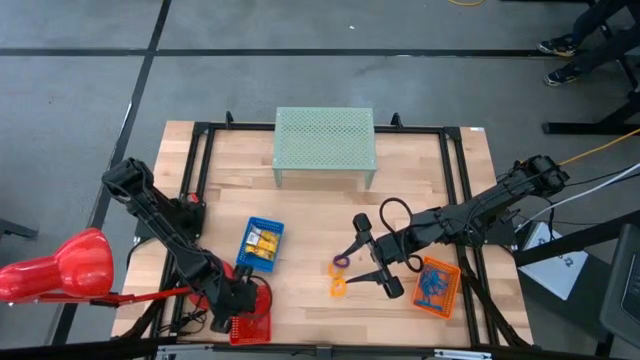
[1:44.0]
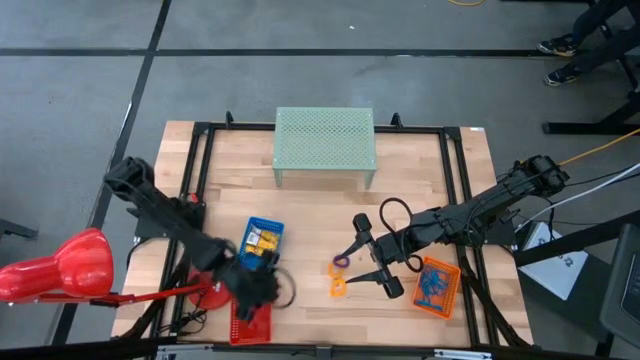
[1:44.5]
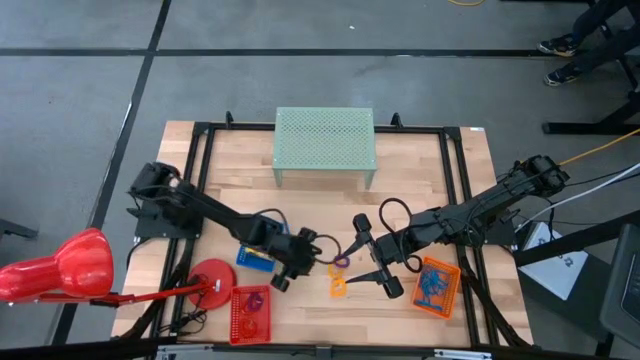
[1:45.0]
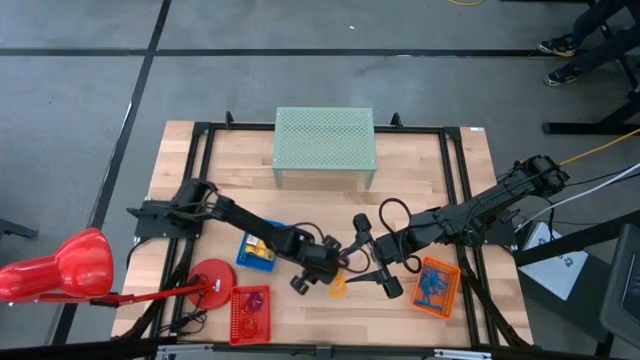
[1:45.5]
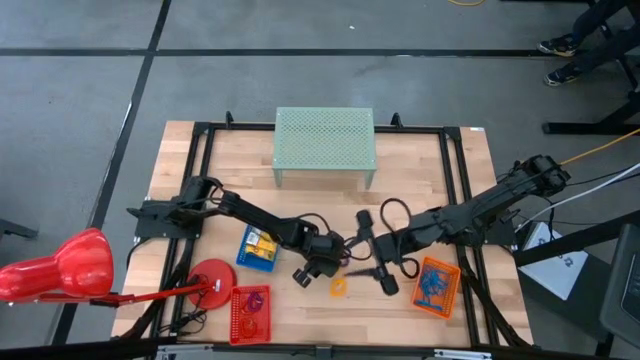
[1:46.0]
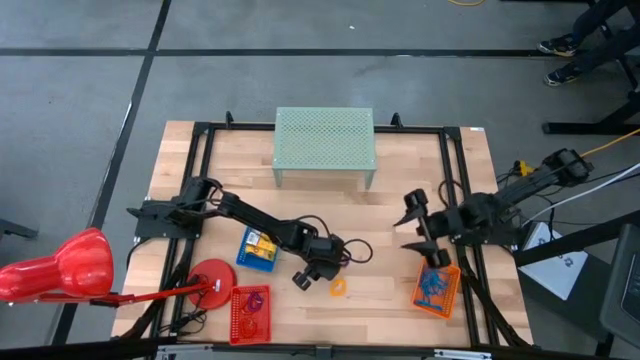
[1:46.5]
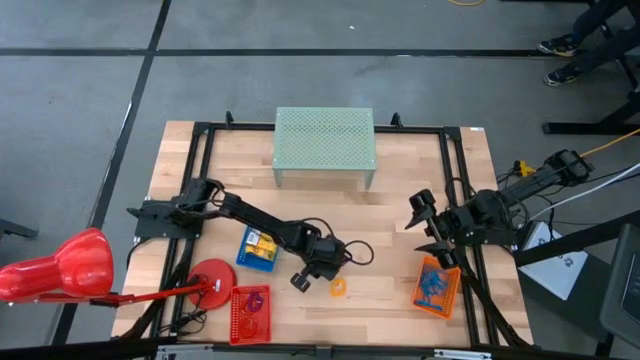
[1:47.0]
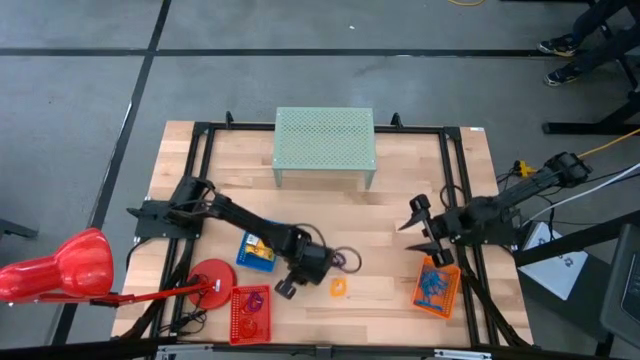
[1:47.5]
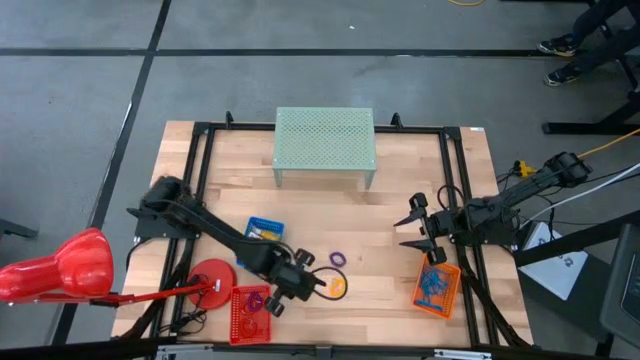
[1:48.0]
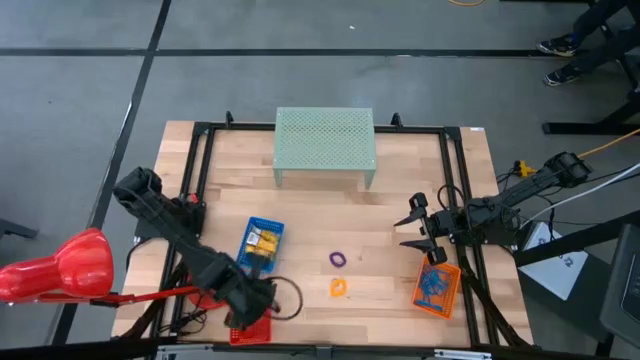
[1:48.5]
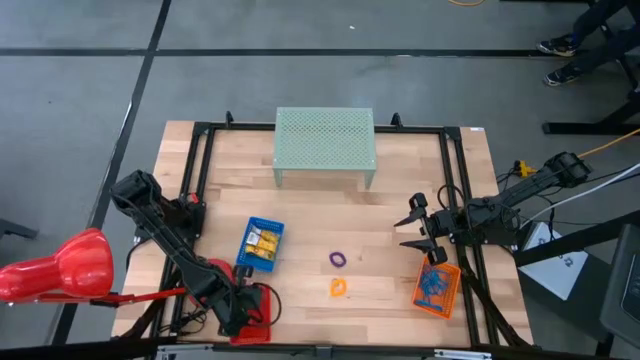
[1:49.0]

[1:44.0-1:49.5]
Task: Pick & Place Office Desk Supplies
Put the top yellow spiral band into the red bin

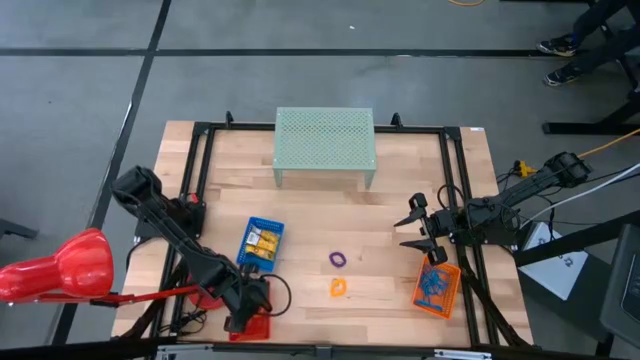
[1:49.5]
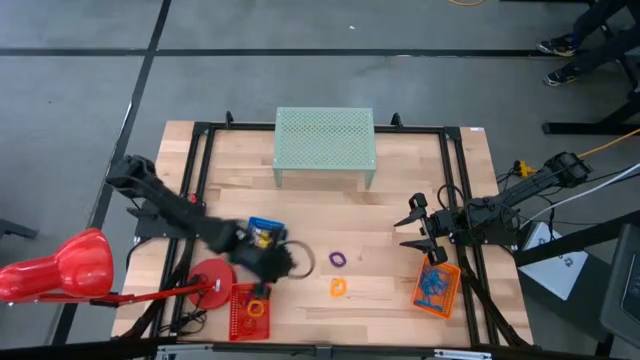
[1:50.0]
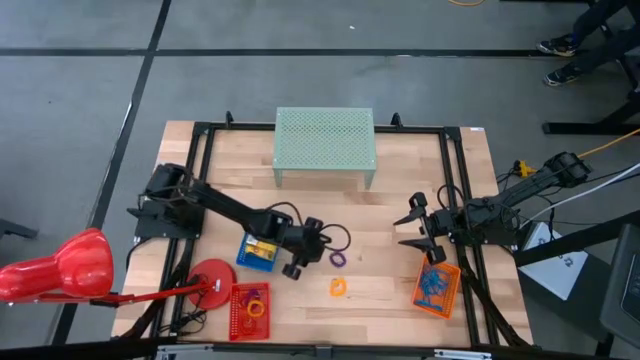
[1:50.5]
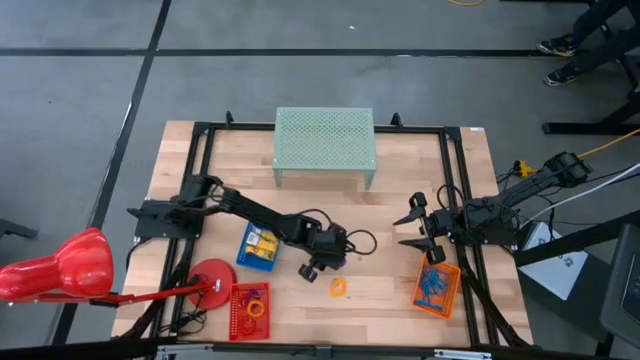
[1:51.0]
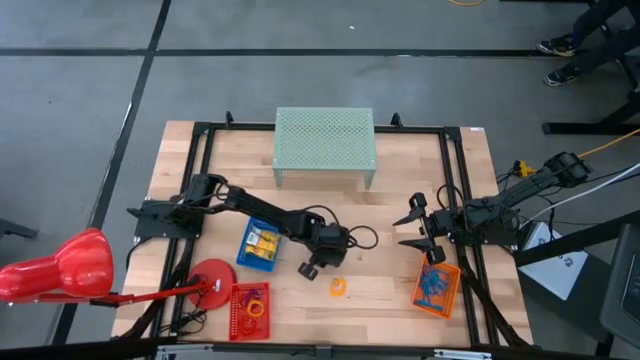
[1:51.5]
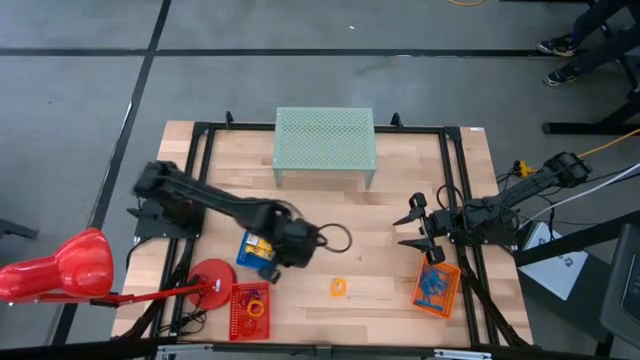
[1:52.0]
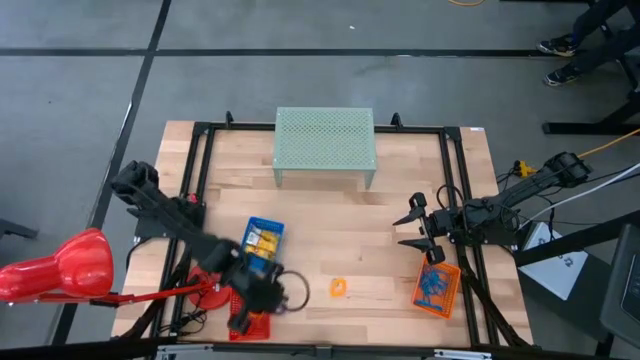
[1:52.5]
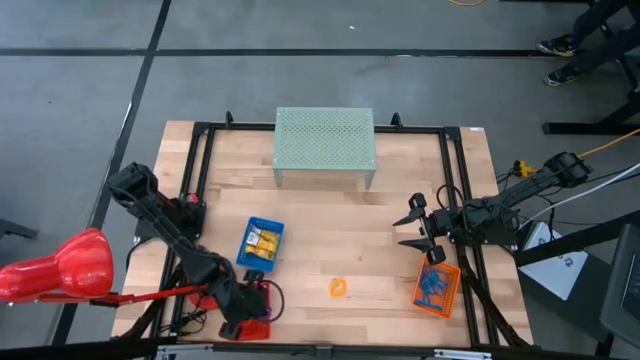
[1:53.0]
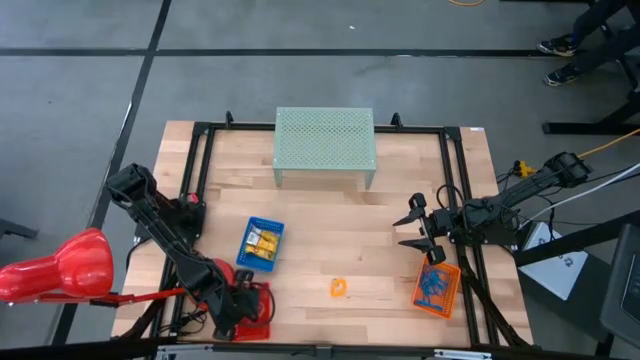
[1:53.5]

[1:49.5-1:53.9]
Put the purple spiral band into the red bin

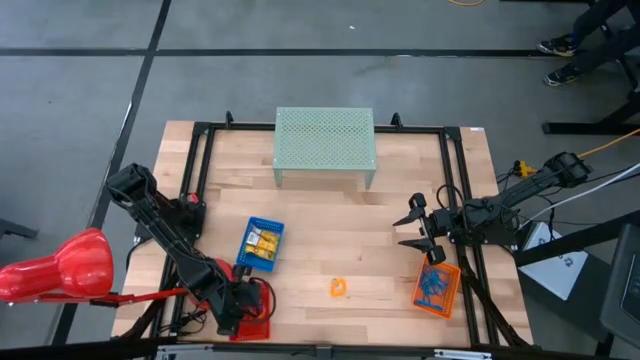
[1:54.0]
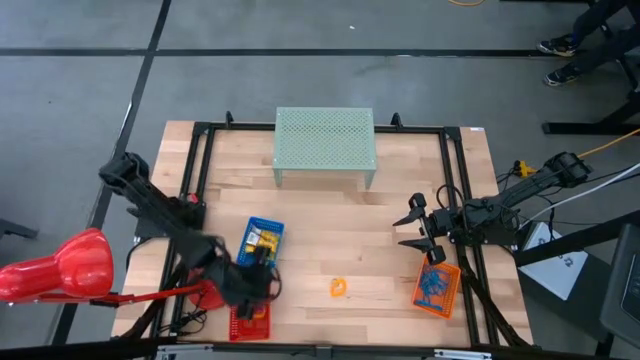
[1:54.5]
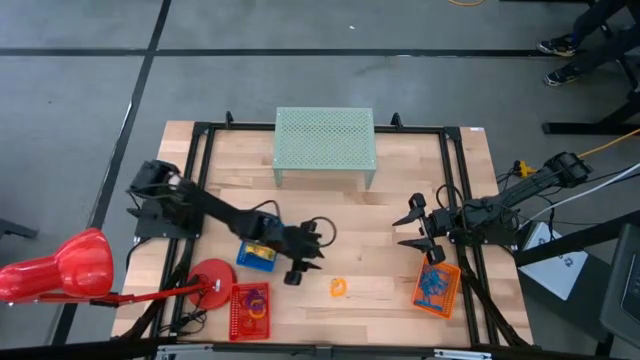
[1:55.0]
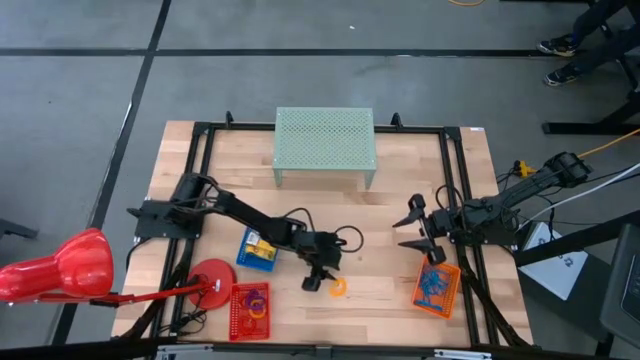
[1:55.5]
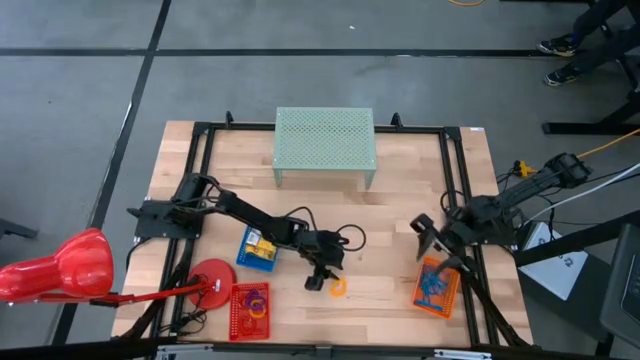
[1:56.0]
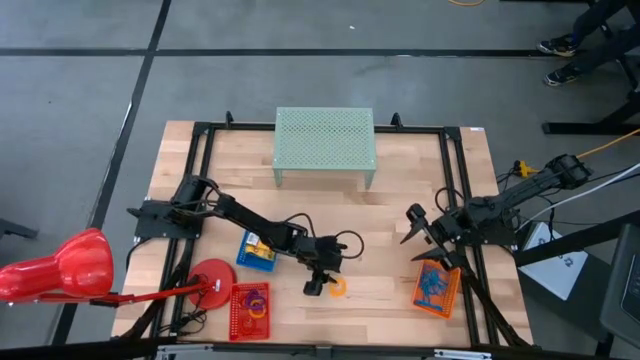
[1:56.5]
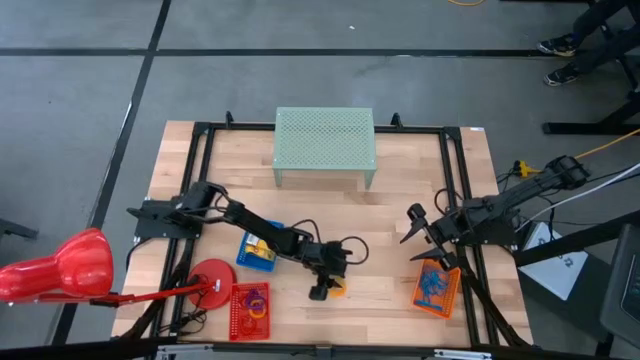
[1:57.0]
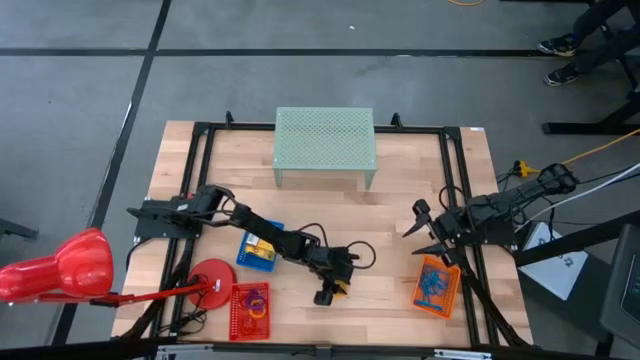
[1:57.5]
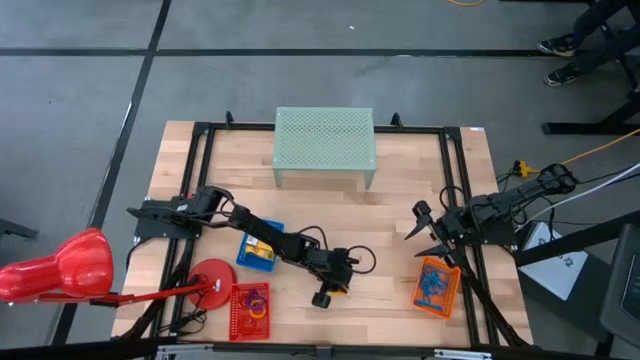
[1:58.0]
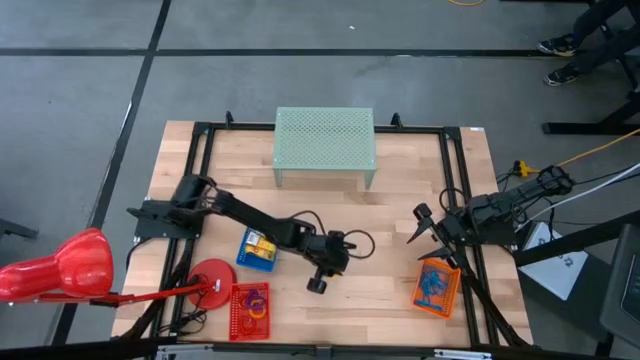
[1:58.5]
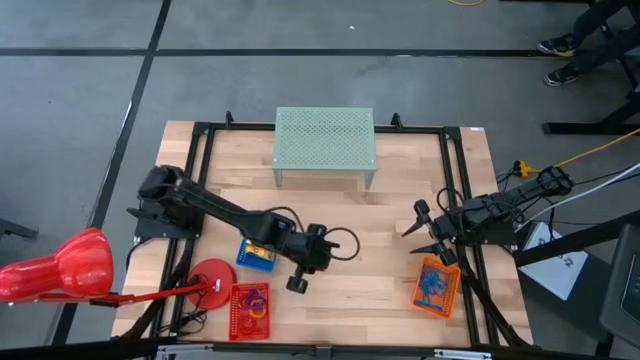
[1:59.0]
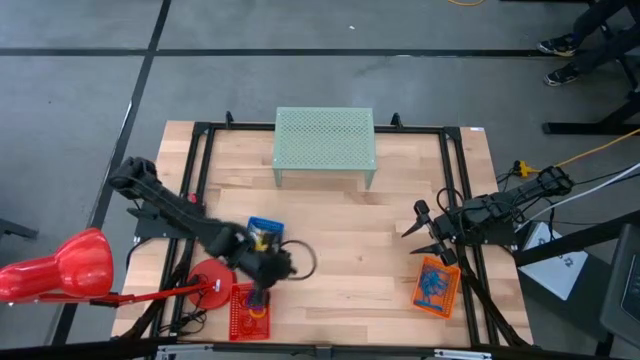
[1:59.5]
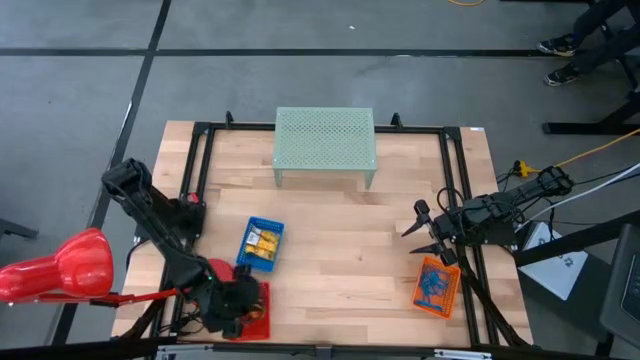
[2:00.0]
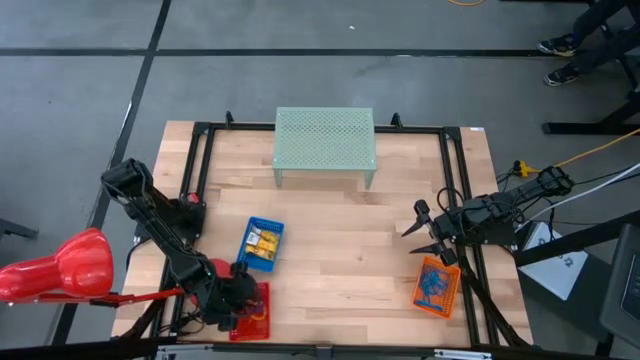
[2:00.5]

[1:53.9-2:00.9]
Put the yellow spiral band into the red bin

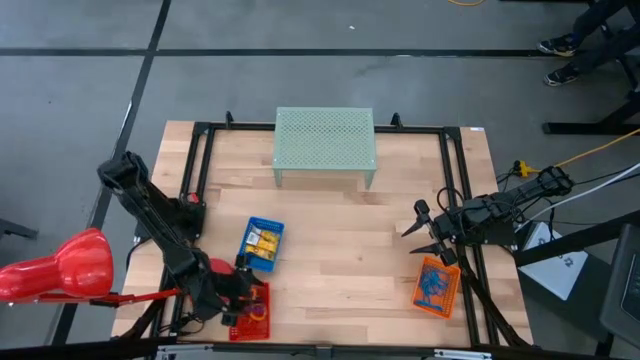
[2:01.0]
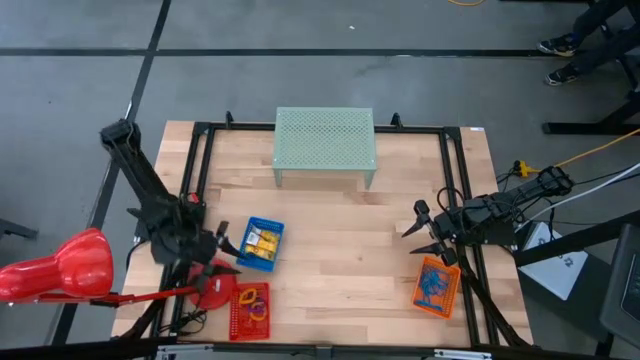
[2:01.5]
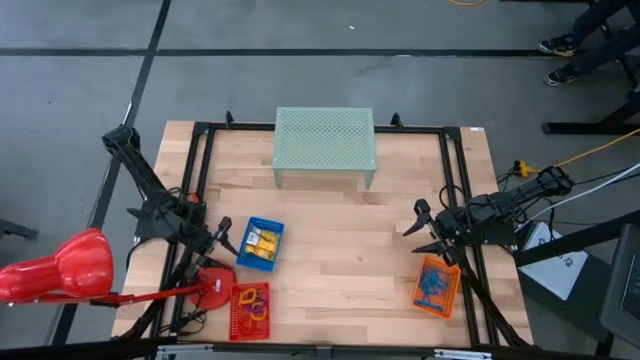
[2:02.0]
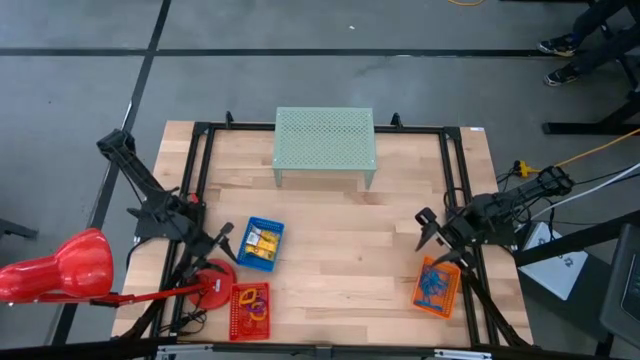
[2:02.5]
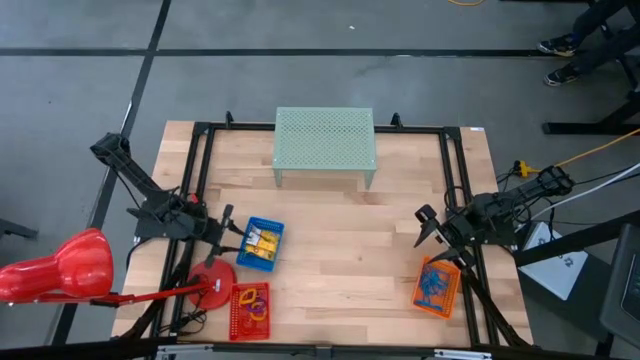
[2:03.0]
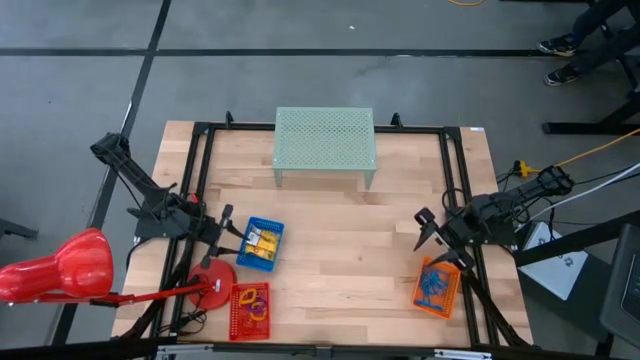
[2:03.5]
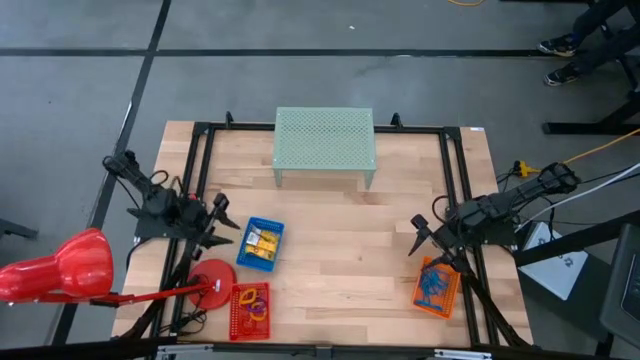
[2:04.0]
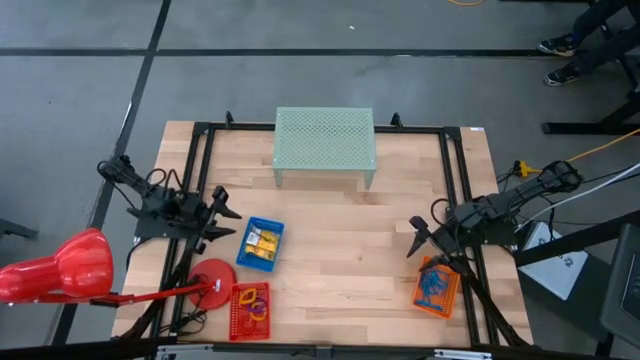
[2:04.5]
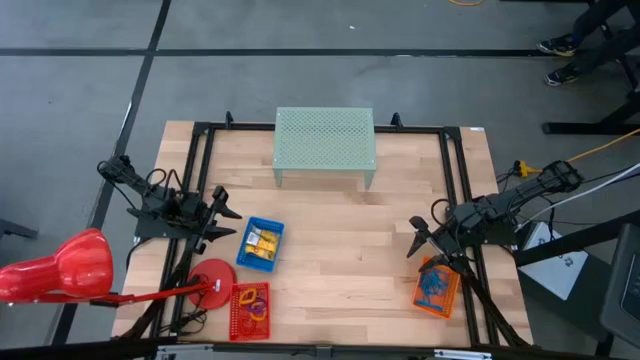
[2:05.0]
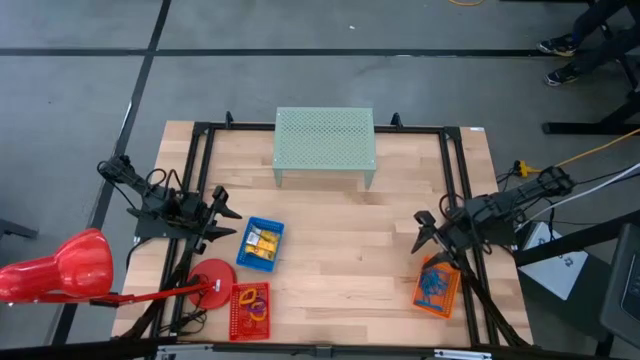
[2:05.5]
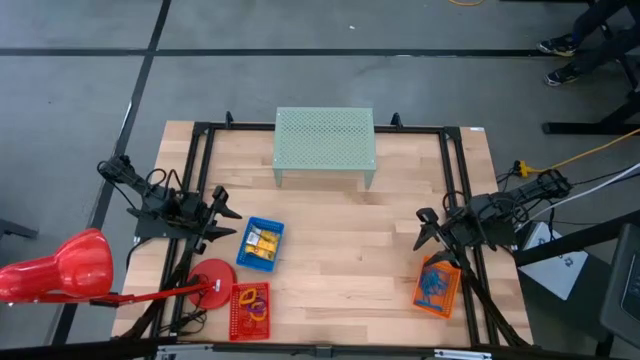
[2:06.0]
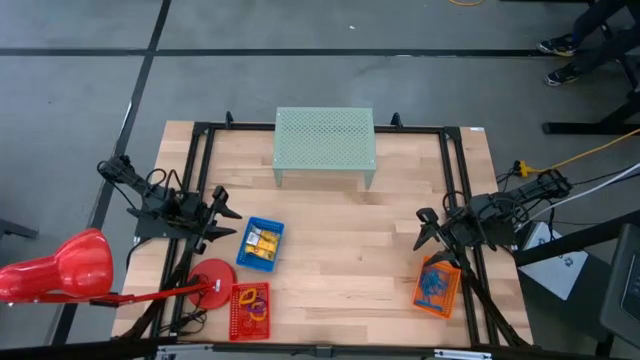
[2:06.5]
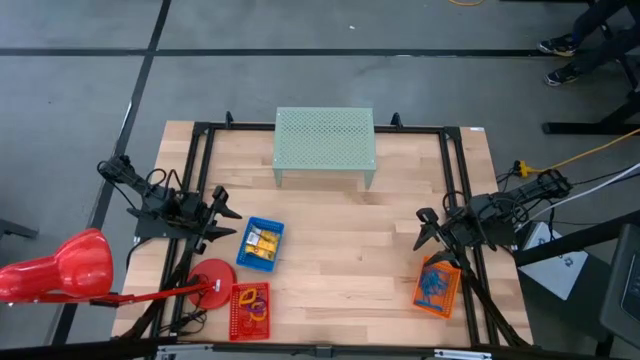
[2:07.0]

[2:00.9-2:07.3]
Return to Home Position
